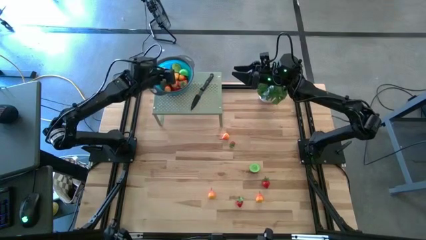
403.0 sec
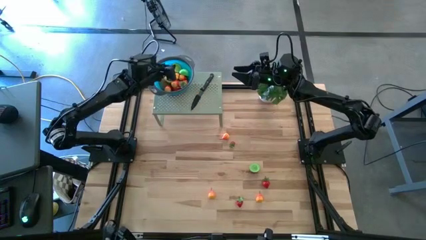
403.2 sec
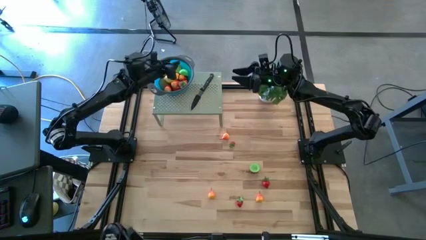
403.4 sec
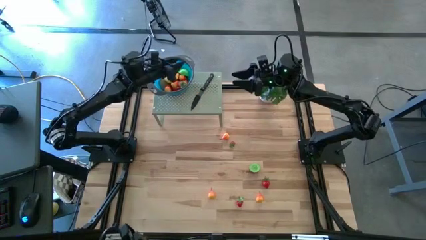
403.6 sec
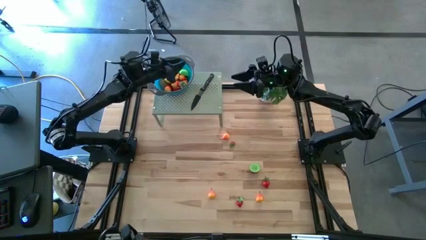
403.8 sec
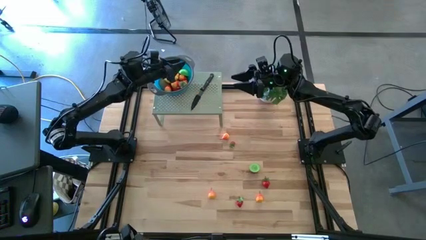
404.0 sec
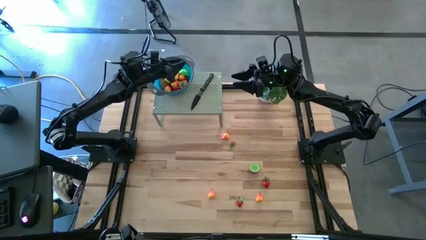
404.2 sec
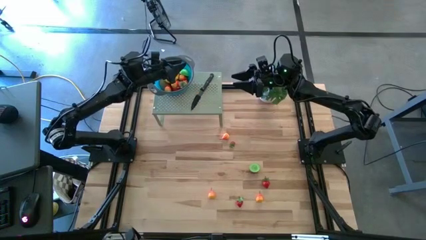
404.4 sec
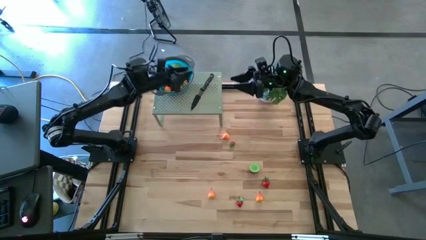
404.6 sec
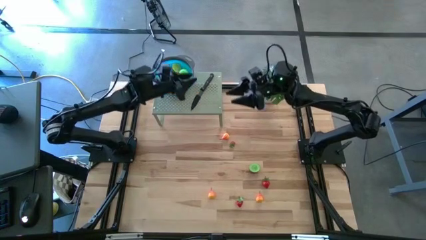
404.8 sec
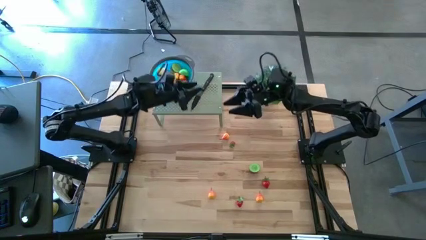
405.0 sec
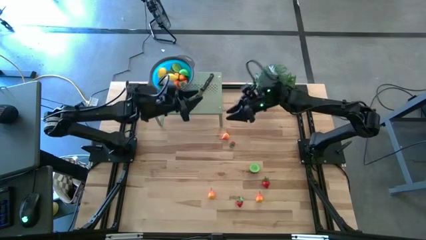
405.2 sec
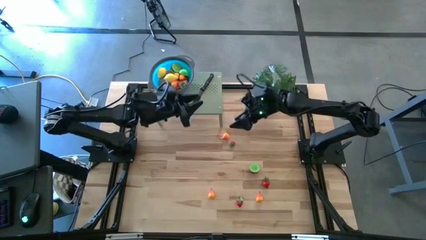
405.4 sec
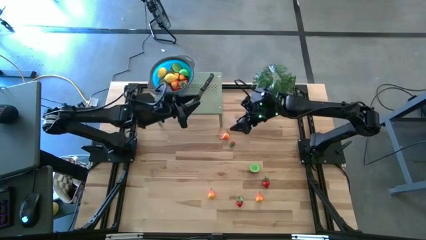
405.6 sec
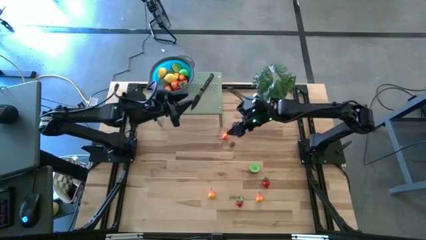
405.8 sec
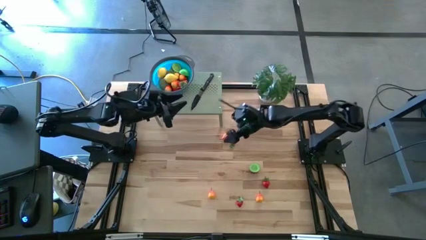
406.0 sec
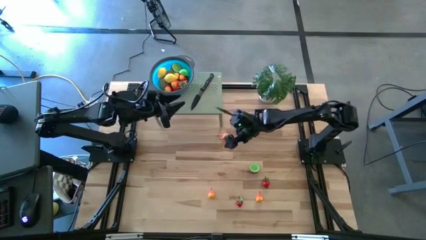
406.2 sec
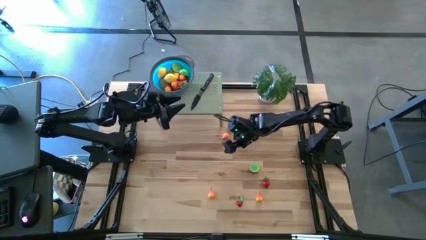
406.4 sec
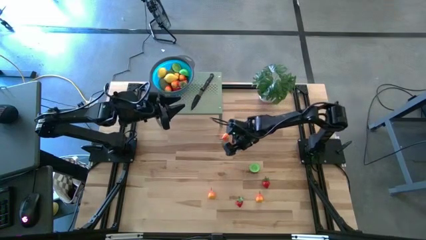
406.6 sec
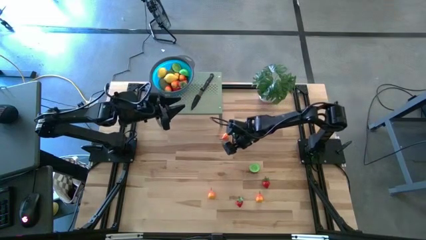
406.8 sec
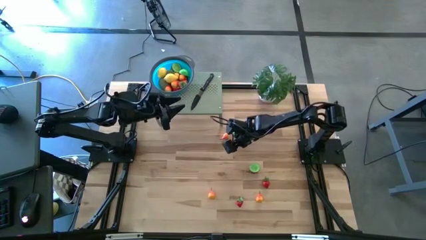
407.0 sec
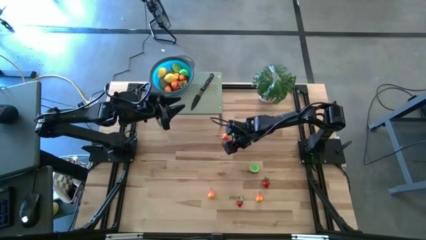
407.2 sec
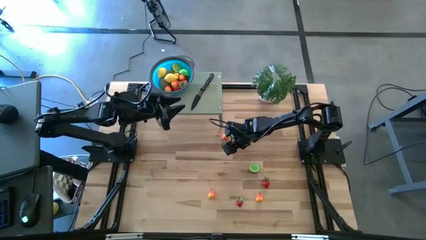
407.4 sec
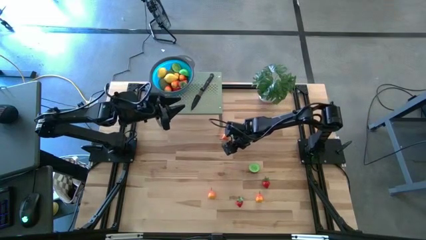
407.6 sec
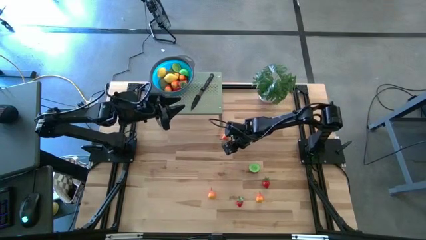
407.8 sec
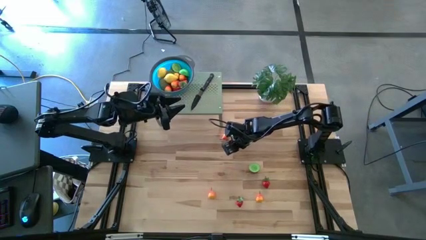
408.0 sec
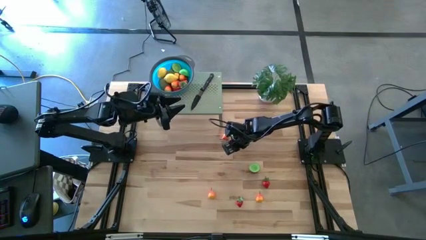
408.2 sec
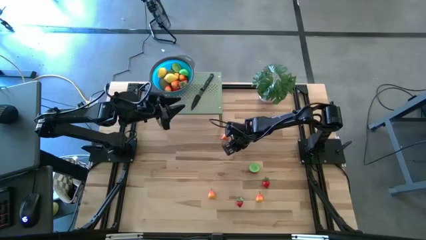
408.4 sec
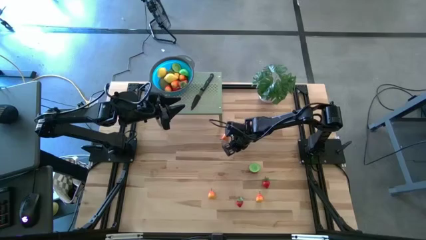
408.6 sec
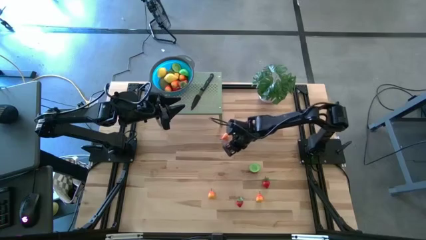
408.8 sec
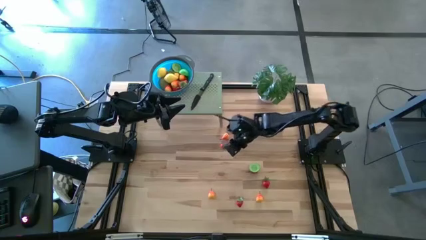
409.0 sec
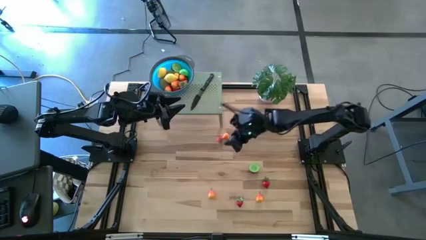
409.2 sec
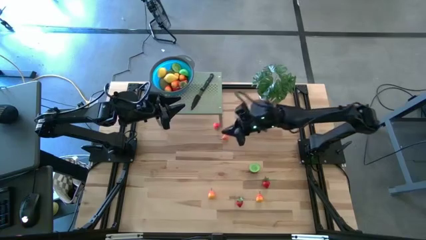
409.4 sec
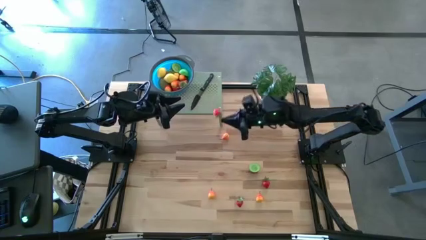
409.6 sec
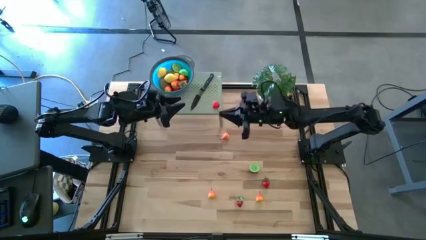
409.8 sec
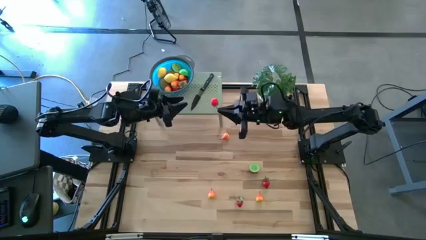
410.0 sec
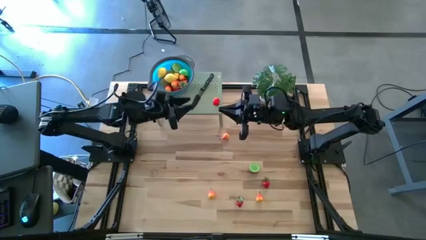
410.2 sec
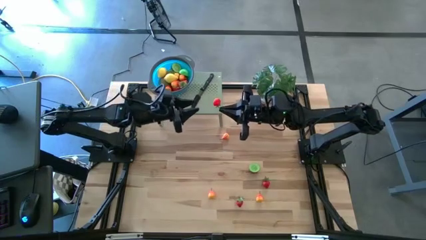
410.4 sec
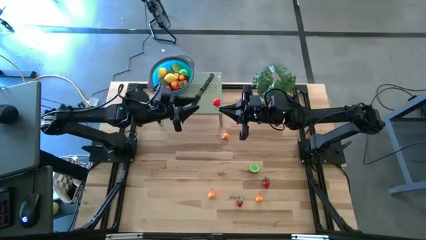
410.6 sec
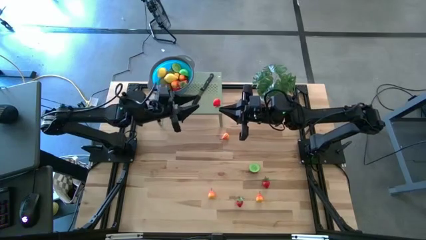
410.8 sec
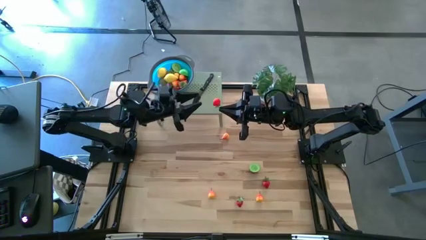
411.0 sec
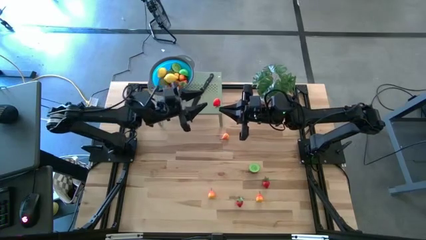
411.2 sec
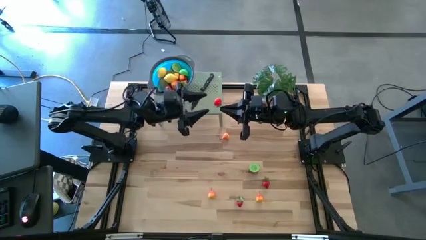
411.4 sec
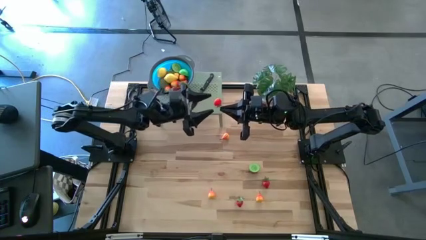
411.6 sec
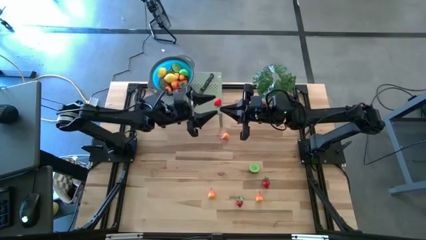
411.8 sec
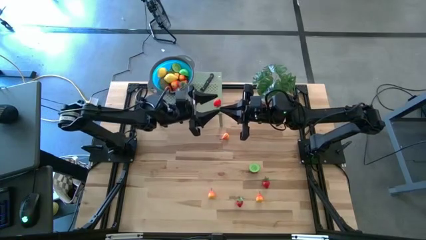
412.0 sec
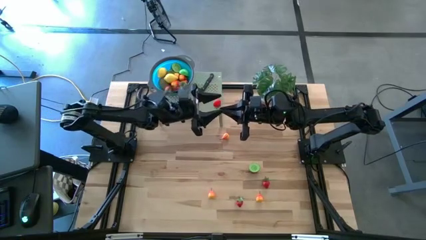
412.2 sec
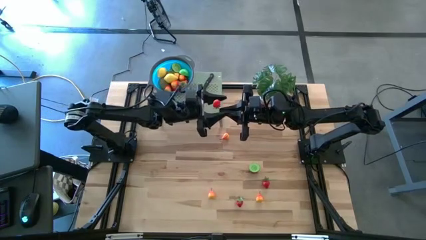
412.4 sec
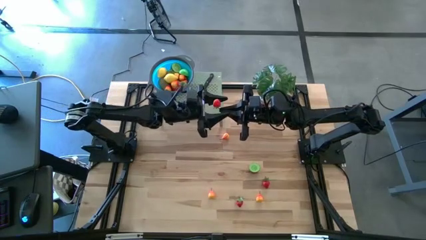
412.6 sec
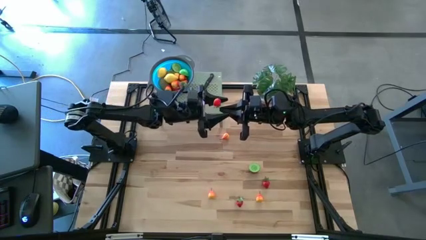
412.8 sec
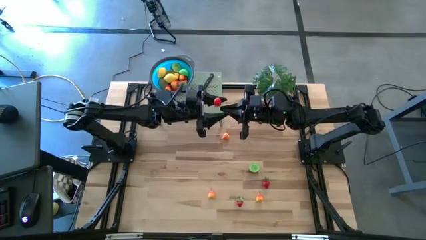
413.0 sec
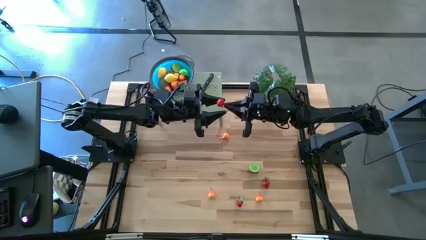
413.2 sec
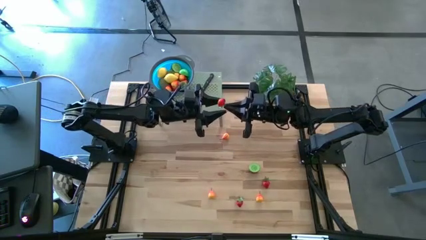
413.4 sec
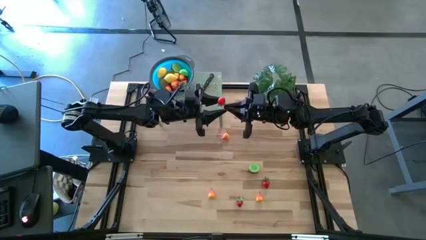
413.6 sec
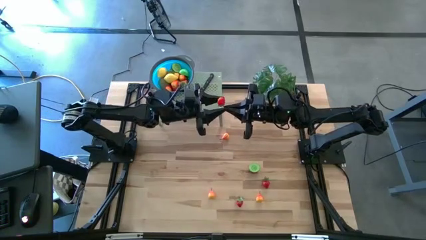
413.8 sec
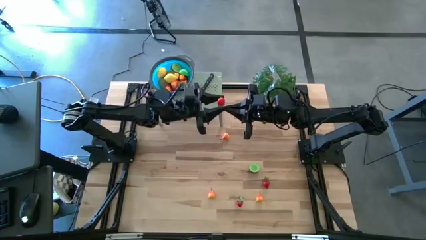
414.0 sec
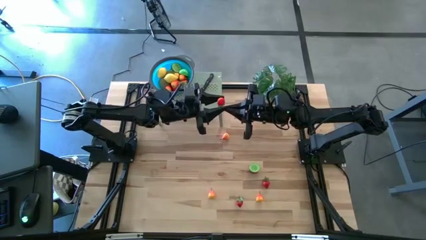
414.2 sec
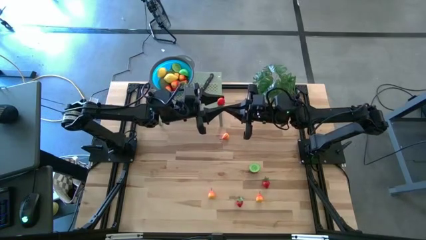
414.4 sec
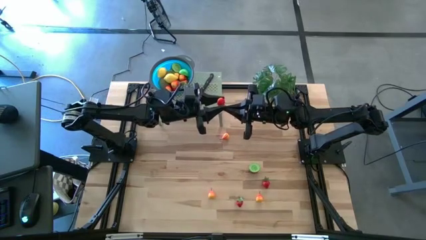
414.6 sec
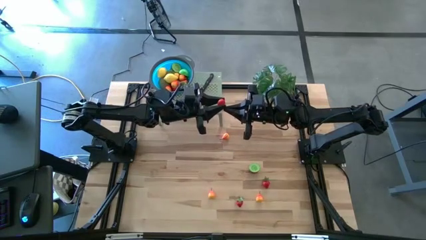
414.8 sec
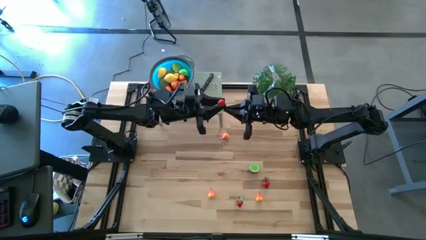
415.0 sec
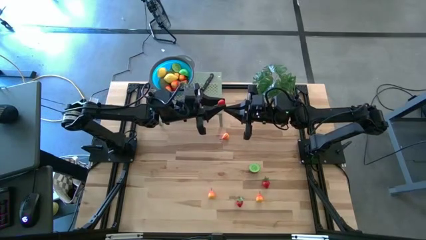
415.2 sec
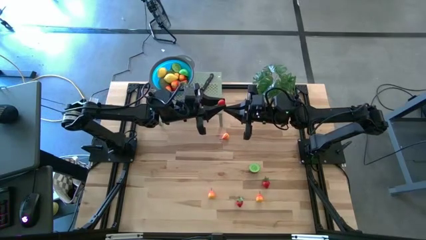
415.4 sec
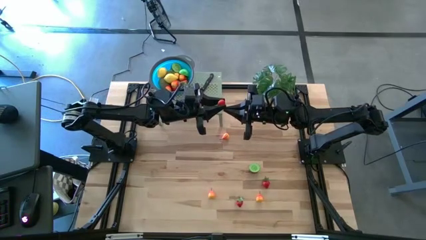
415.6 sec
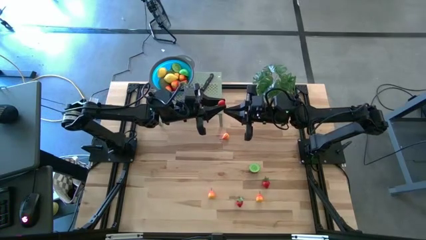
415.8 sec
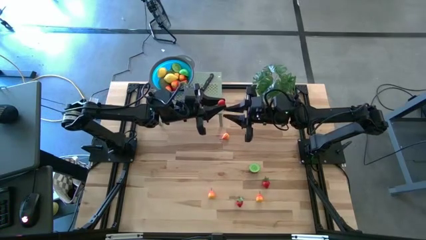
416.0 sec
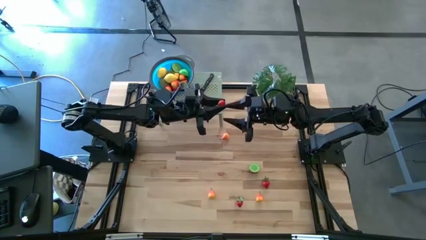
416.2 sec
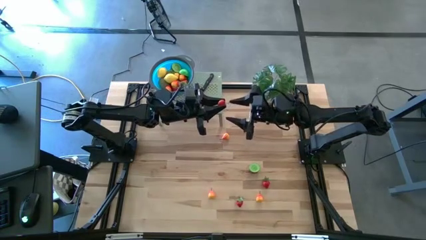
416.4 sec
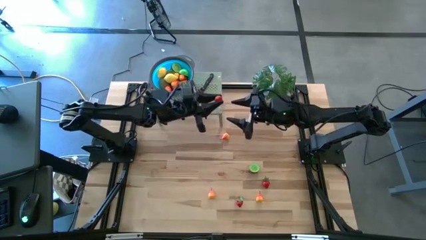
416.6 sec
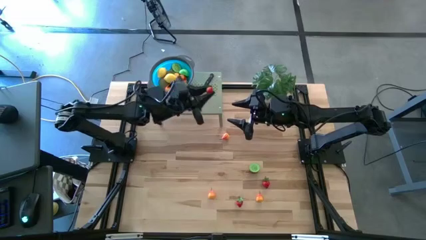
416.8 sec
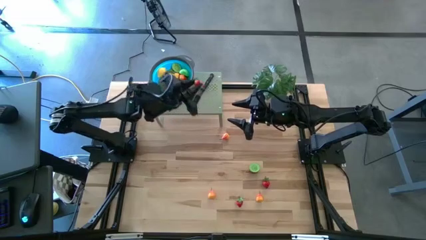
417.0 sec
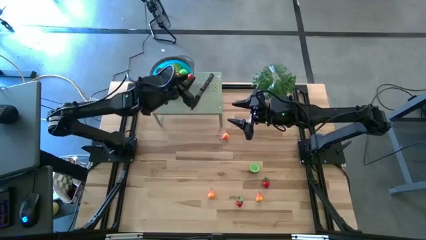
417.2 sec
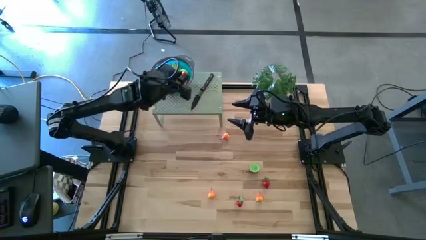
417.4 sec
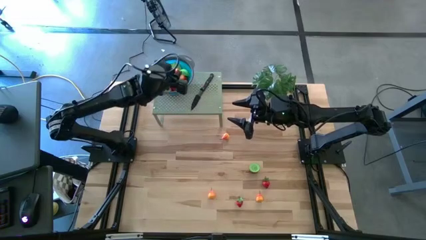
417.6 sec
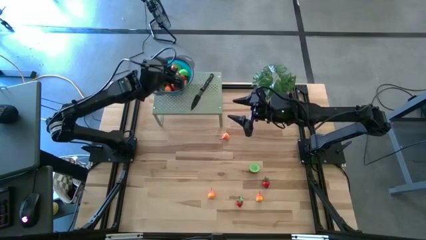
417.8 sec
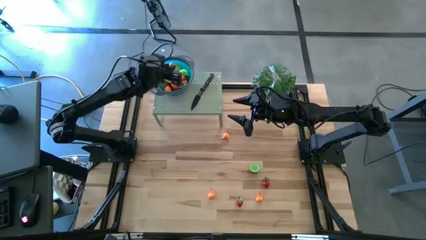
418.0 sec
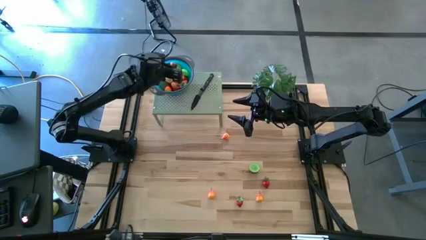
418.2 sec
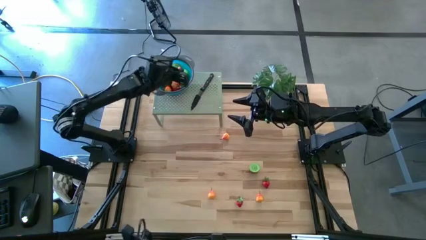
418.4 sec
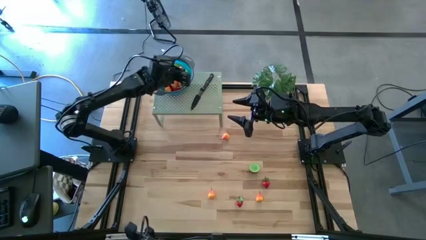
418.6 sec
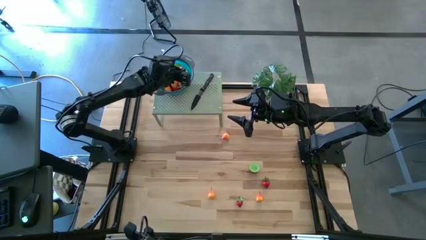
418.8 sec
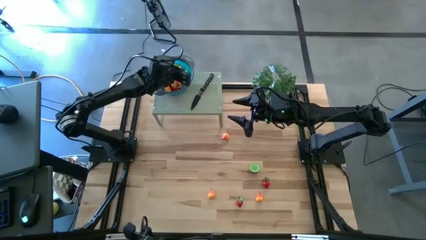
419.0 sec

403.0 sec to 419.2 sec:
Task: Pick & Place Fruit
Put the strawberry into the strainer bowl on the shelf
